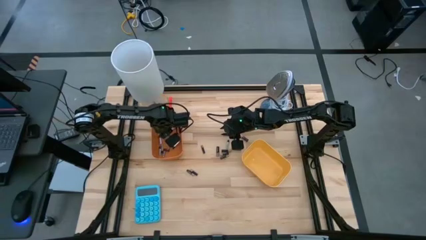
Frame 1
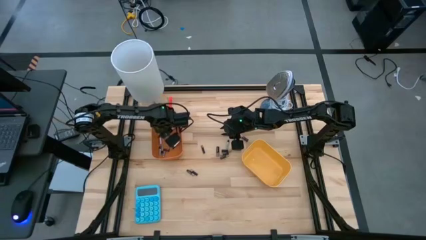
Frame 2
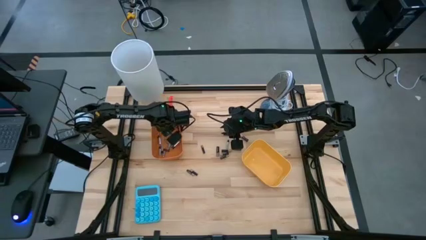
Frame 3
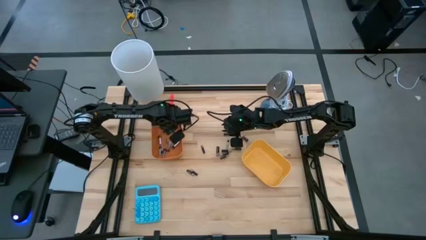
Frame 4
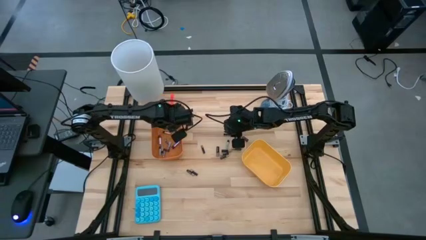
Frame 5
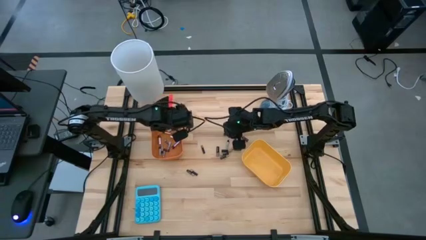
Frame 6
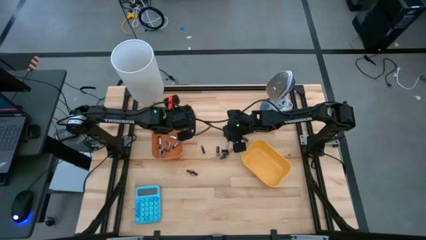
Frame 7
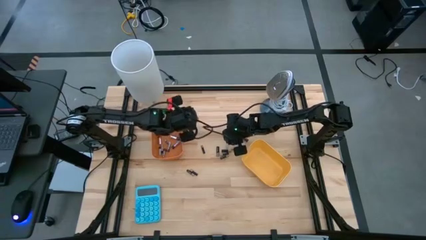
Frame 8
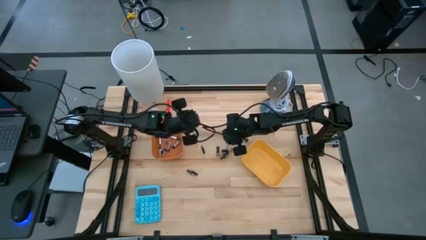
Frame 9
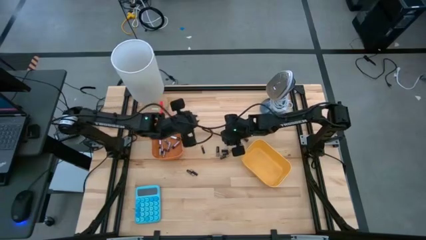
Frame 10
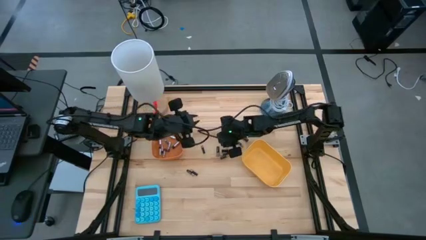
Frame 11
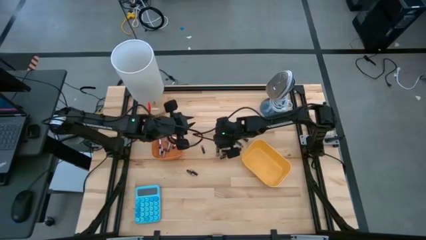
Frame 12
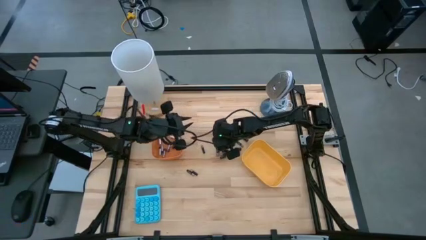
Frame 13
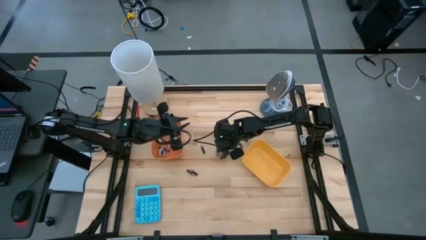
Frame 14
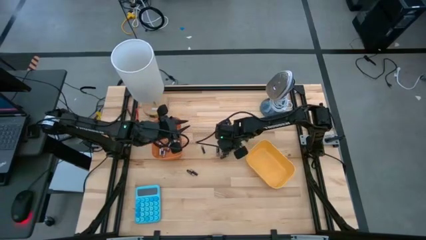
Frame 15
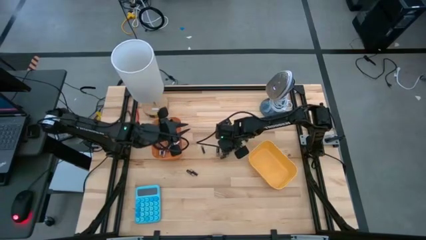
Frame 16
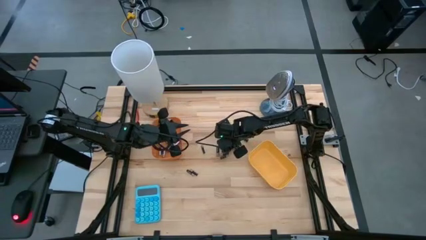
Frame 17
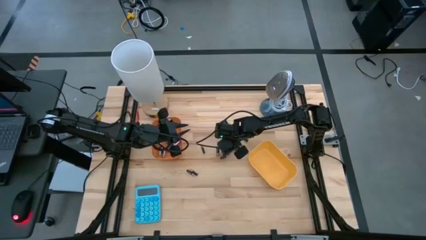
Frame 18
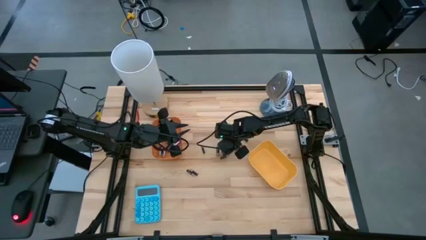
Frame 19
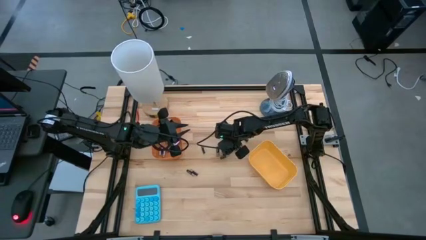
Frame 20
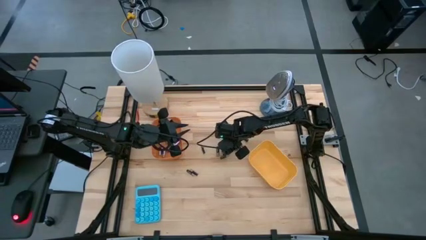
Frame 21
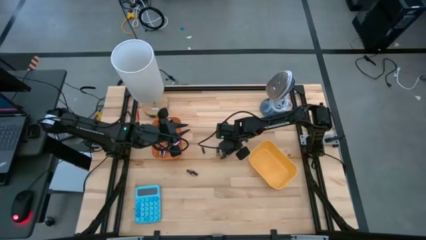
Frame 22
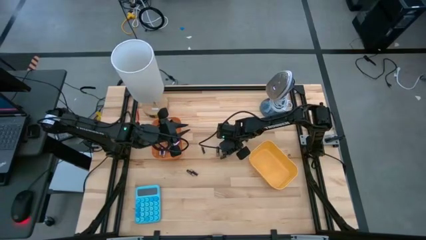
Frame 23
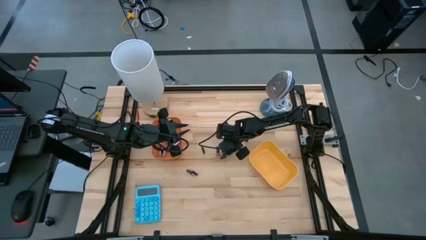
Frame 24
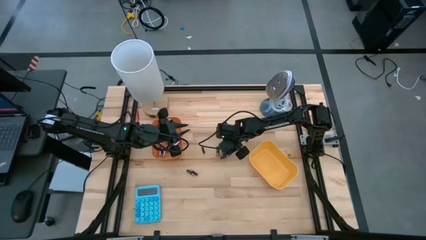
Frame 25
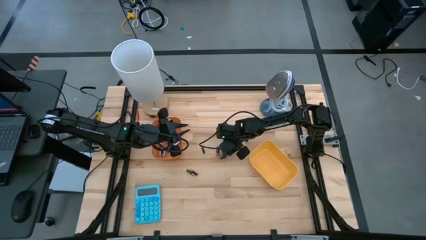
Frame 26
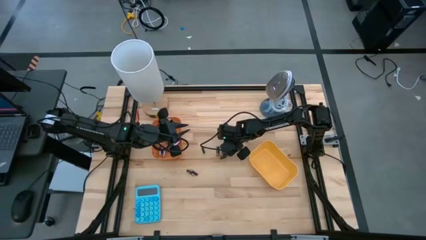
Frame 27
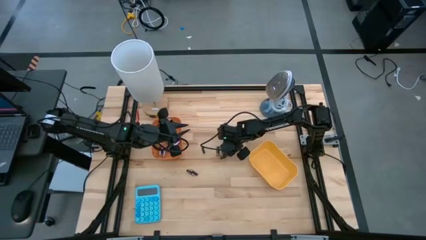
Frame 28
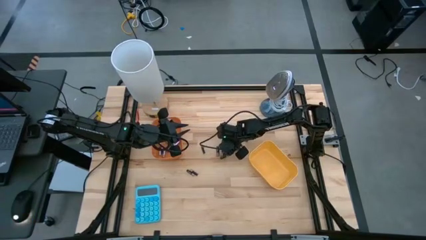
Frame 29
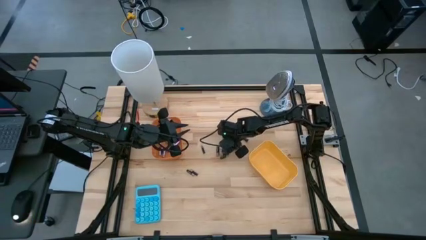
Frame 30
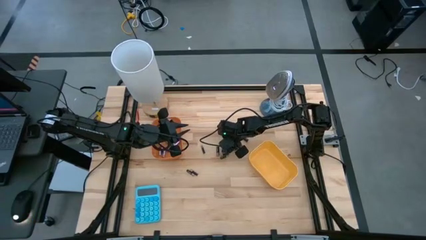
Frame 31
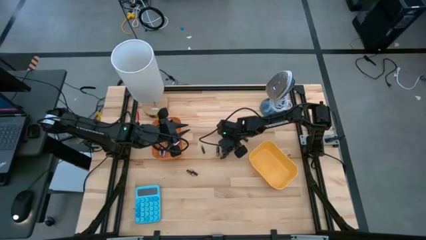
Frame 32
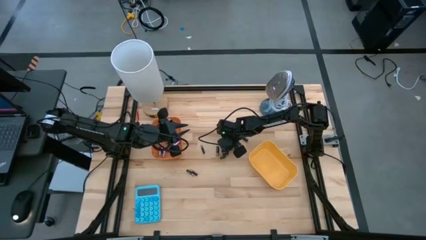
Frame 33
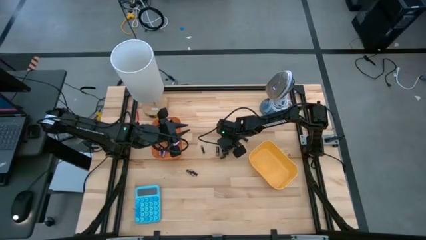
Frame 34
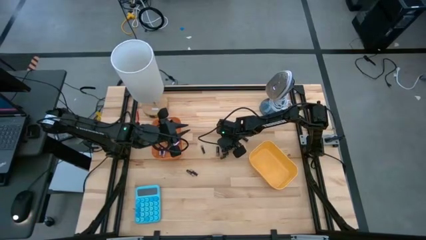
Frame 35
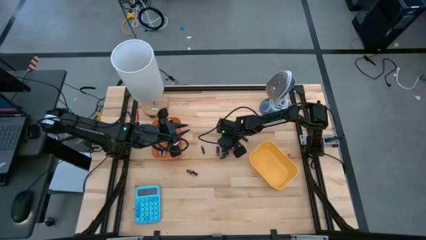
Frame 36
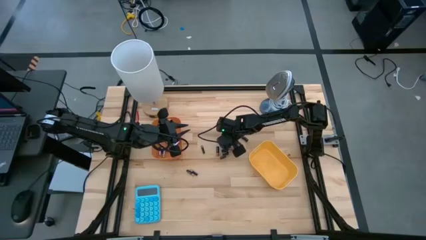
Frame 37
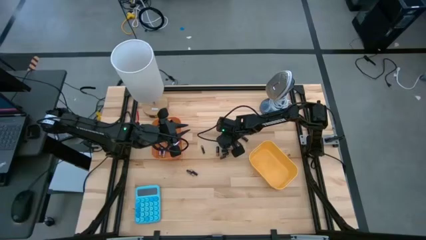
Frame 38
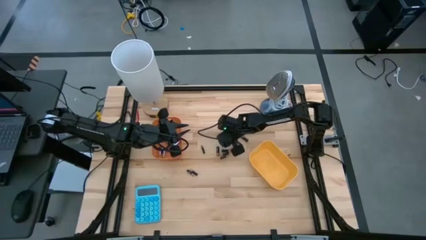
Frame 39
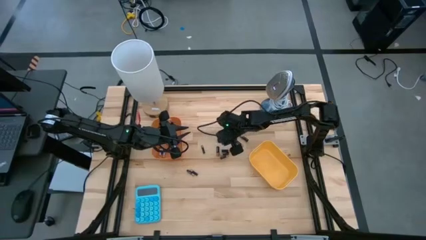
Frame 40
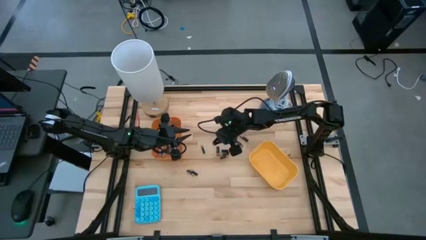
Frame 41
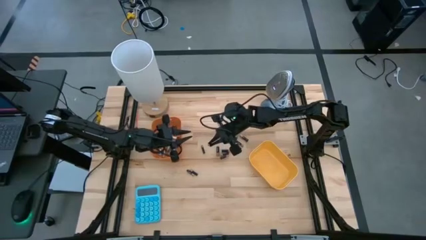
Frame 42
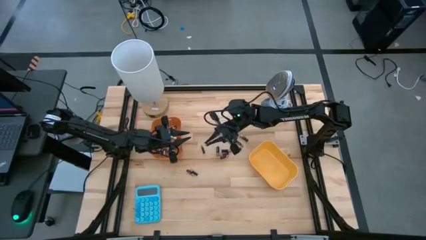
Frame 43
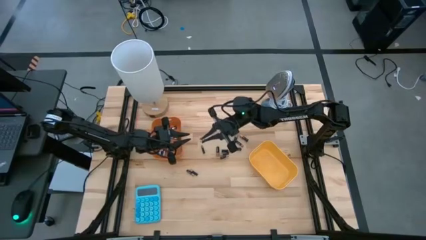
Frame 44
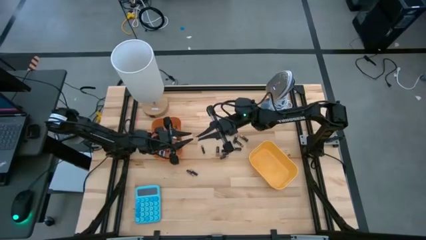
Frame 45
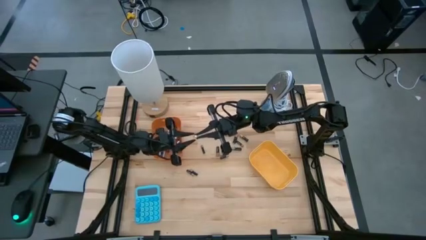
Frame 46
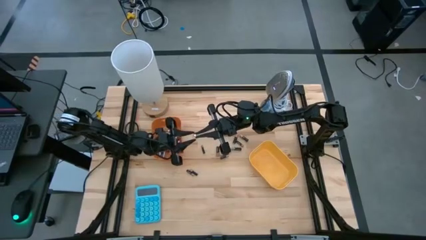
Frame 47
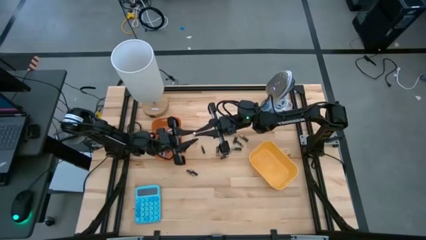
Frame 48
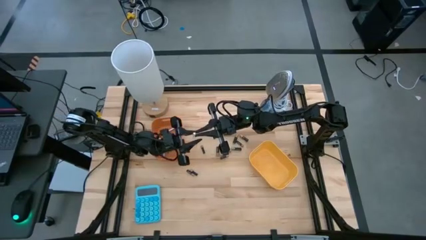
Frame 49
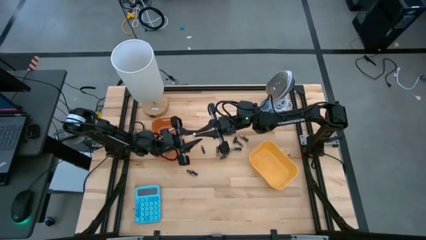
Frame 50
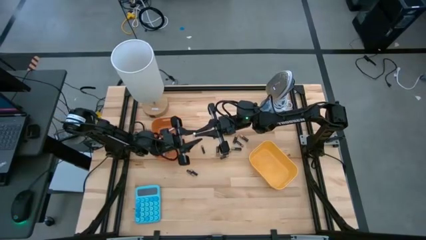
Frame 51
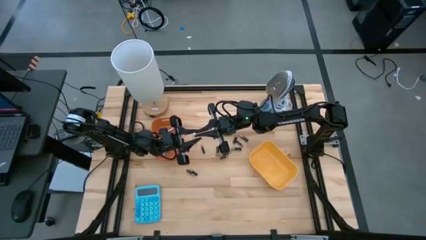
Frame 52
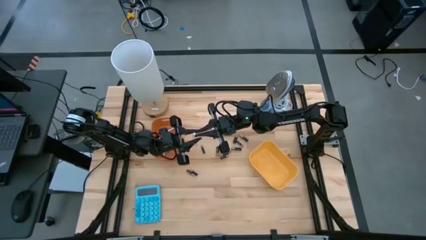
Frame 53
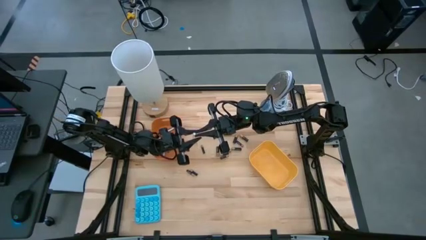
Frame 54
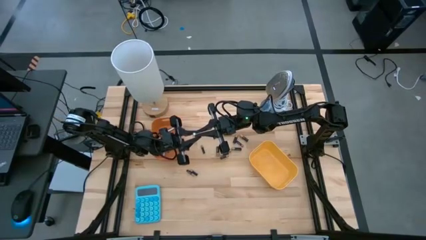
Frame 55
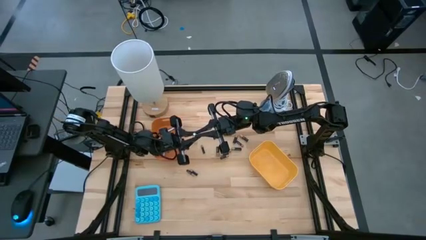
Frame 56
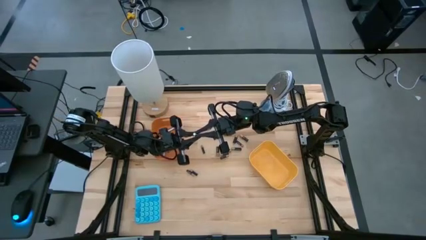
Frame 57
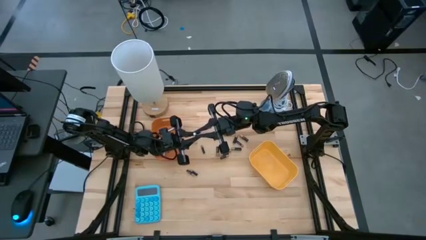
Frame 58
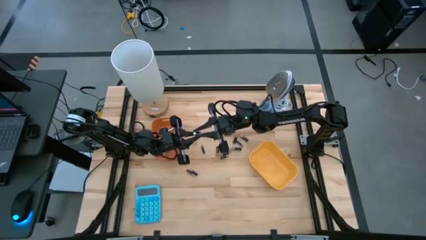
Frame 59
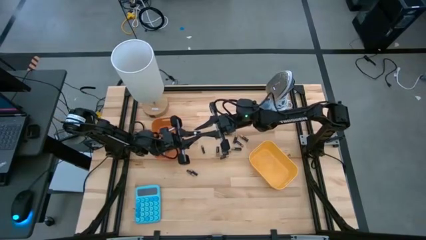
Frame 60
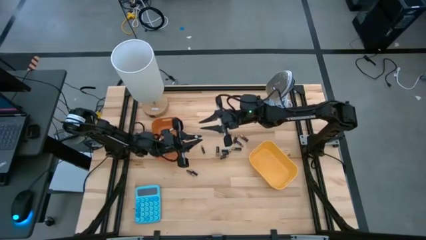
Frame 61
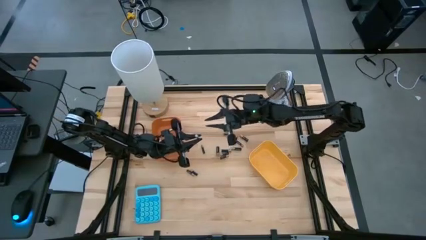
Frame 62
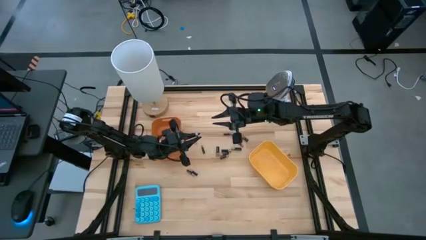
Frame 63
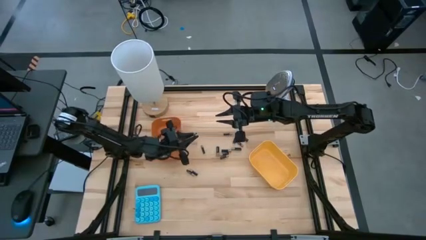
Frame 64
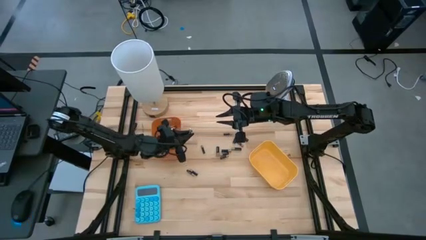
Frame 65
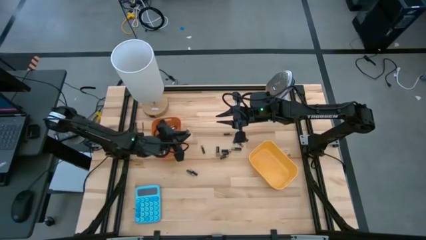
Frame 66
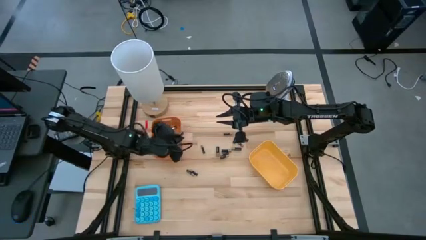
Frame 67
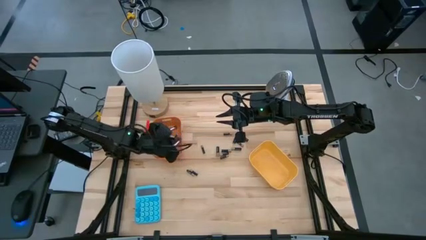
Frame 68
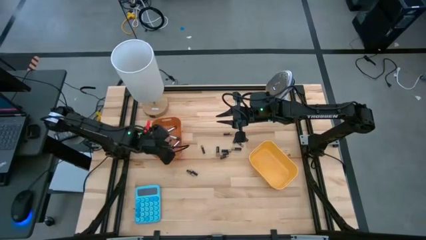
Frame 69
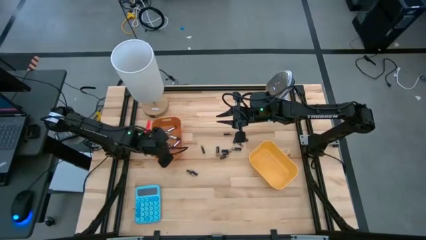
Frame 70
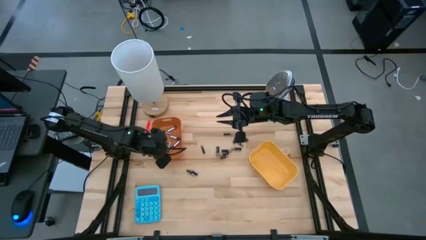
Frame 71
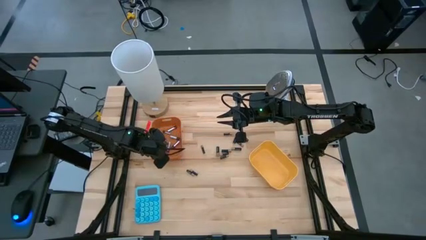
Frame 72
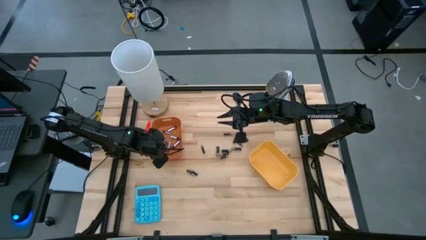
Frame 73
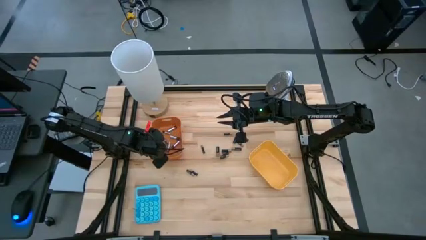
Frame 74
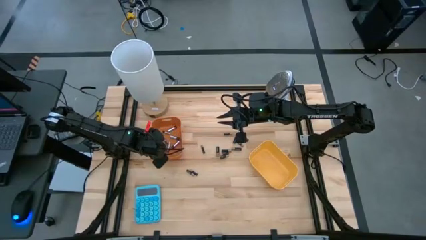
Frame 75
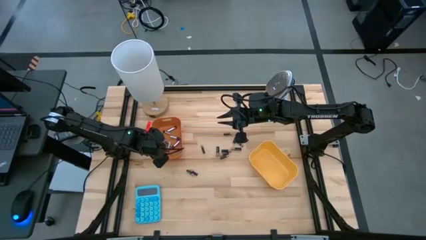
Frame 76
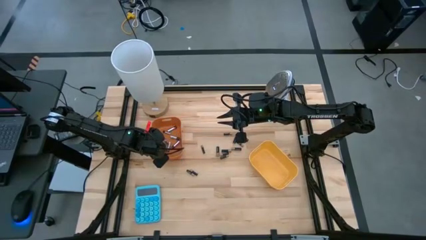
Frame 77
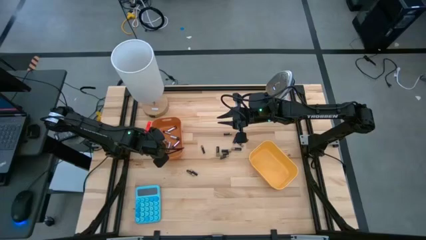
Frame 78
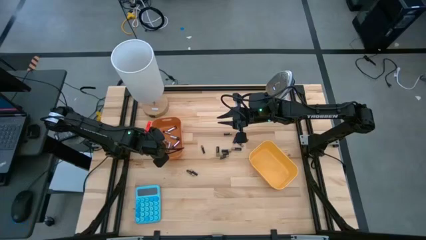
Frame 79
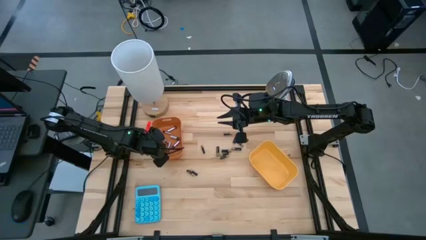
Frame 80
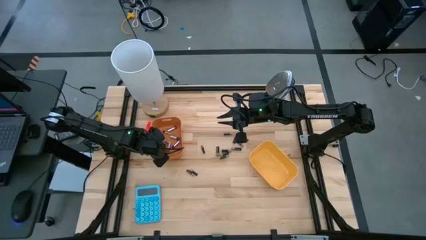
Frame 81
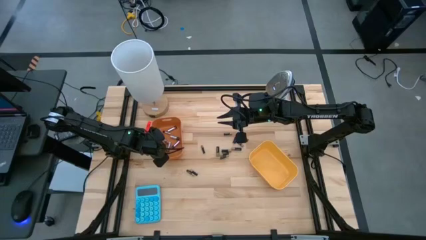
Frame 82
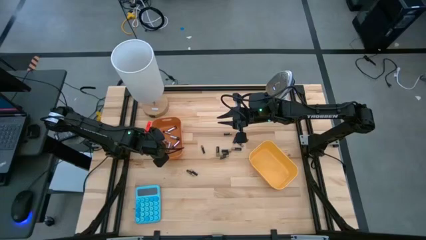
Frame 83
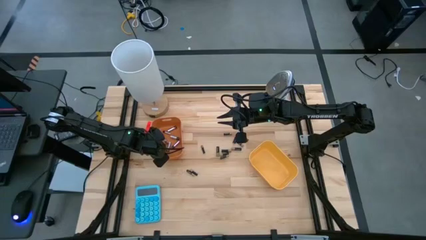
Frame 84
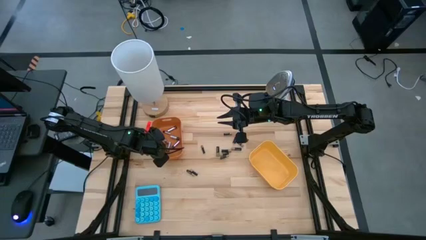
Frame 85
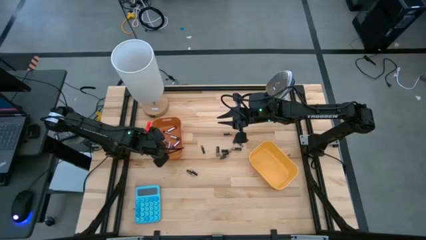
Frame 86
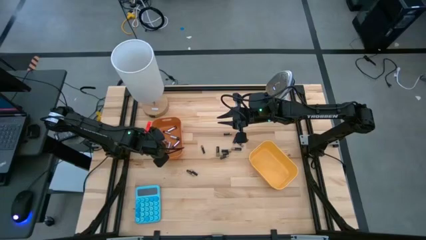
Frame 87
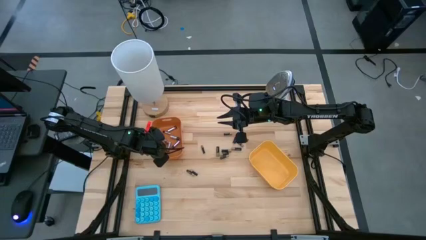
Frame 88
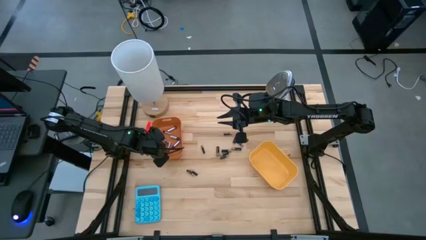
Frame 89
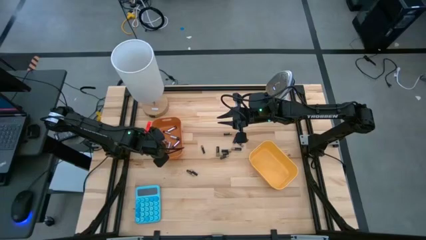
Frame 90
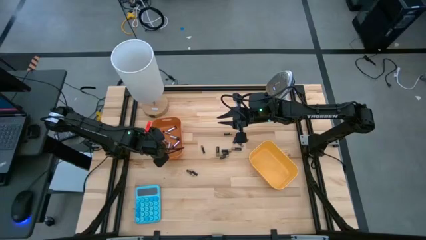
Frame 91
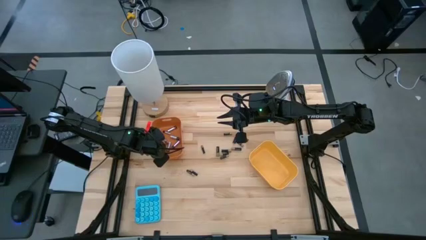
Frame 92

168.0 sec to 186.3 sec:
Task: Sort batteries
Put the silver battery into the orange bin
